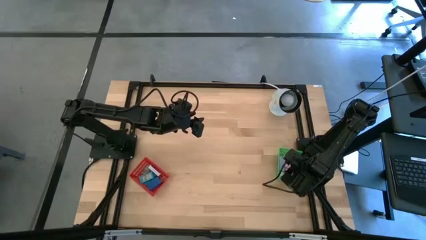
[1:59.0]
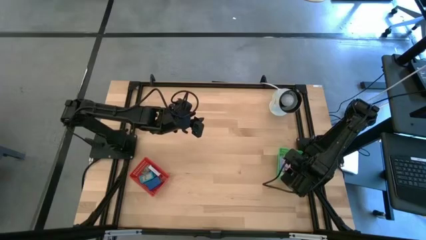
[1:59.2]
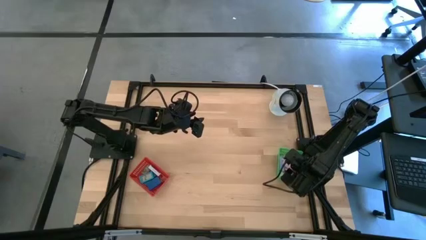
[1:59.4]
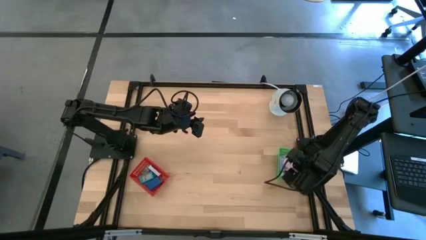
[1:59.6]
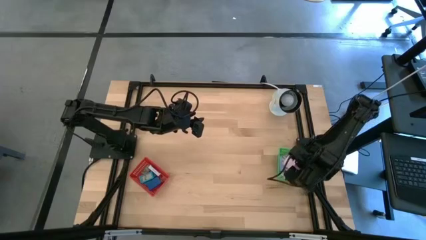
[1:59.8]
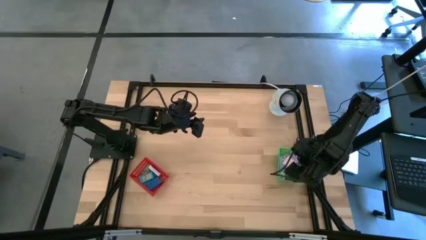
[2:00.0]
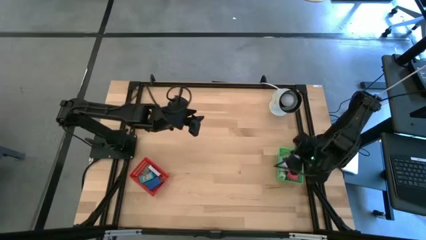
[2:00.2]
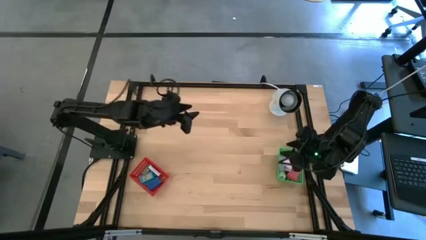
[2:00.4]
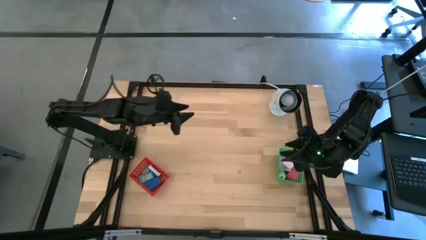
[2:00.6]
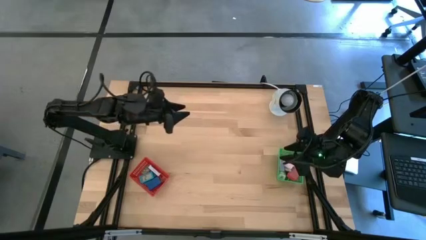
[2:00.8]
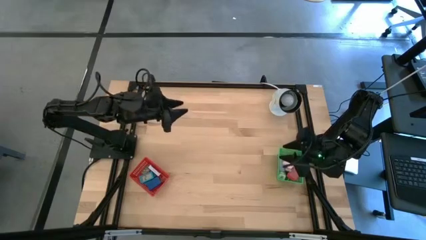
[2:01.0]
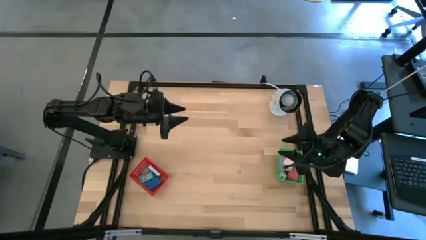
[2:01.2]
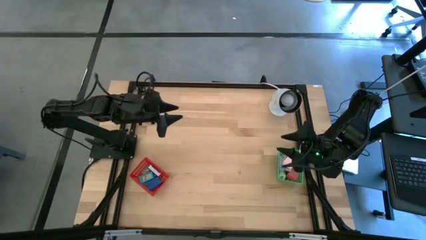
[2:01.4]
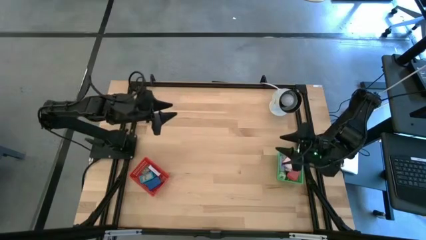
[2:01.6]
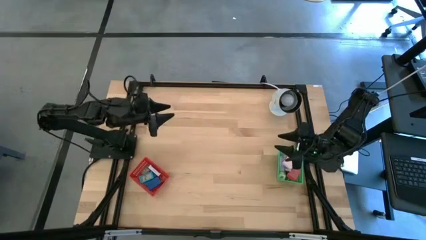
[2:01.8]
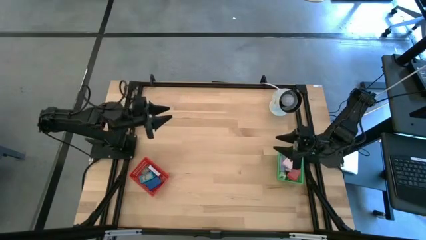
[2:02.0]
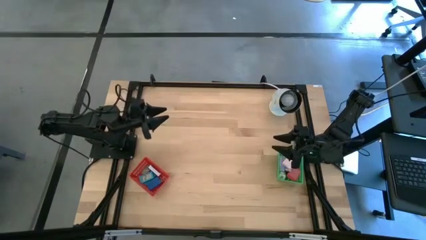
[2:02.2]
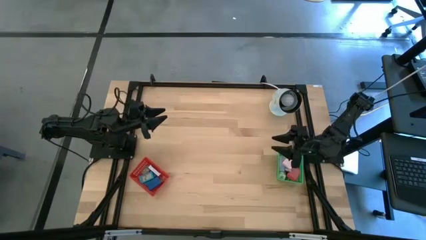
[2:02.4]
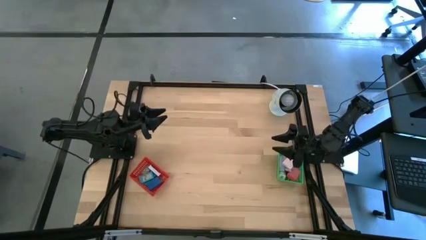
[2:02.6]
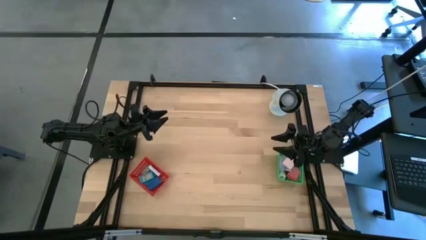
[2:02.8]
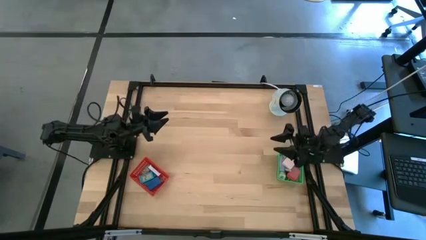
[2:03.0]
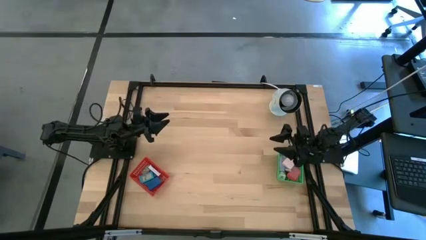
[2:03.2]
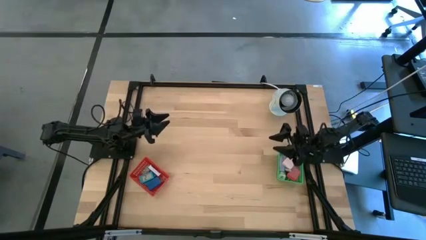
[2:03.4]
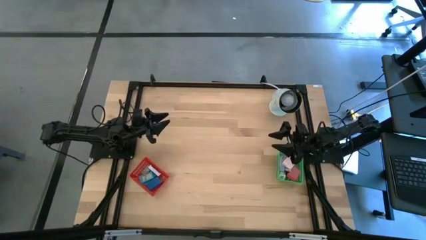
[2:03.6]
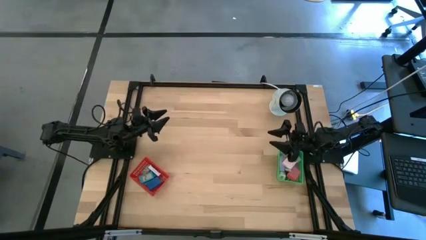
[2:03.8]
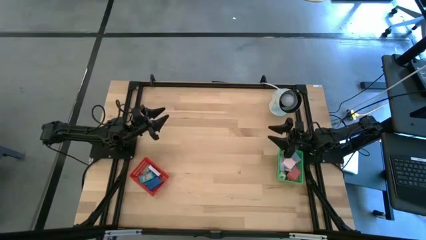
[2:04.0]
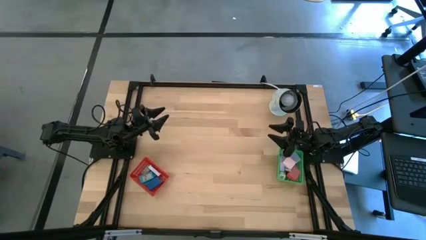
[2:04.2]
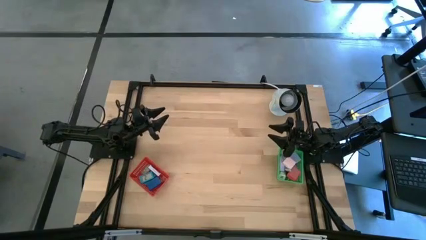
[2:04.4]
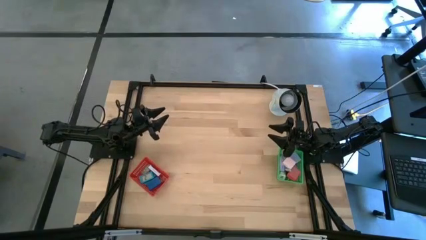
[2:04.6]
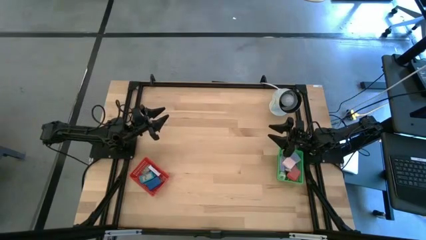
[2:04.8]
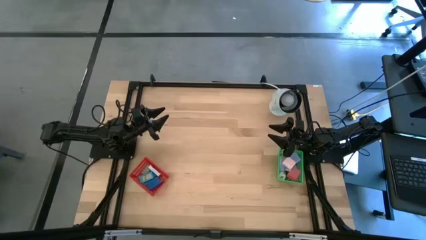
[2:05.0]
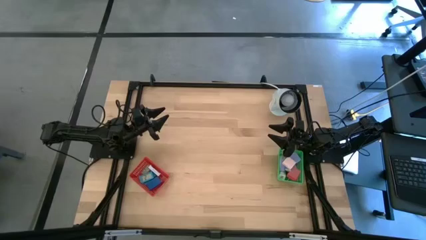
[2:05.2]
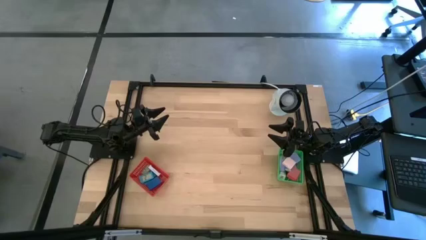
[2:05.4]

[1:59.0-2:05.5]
Task: Pick & Place Office items
Return to Home Position

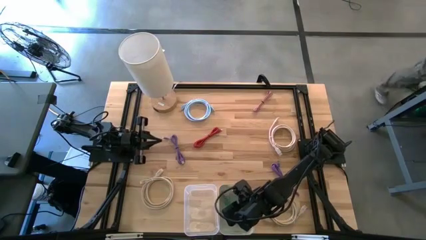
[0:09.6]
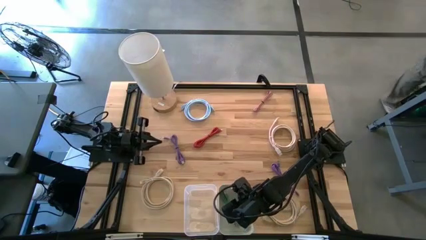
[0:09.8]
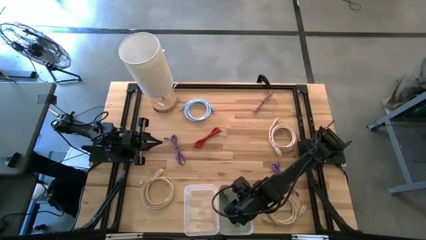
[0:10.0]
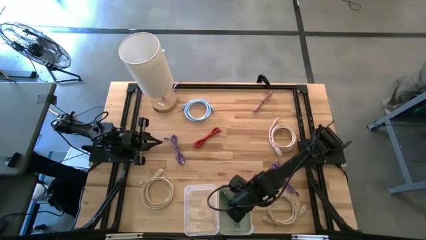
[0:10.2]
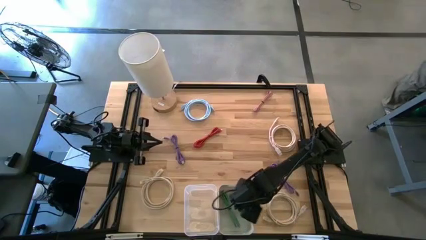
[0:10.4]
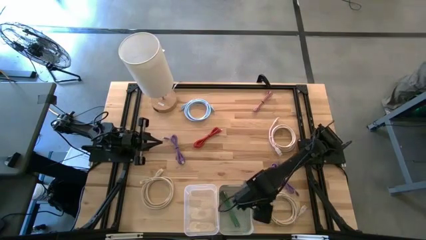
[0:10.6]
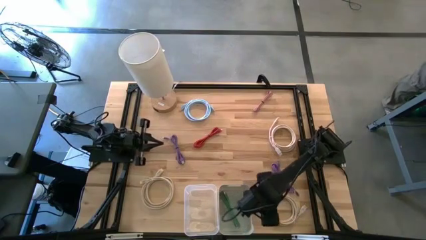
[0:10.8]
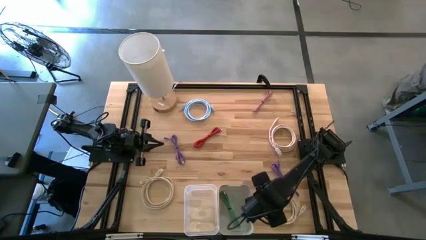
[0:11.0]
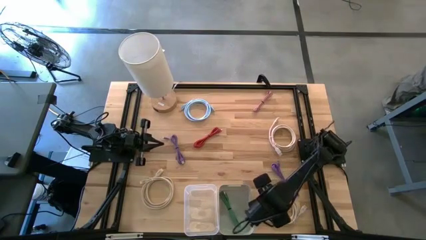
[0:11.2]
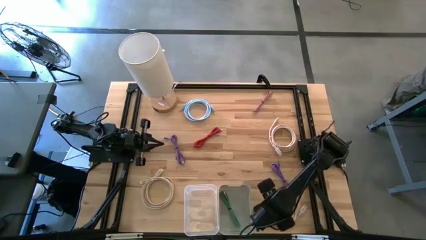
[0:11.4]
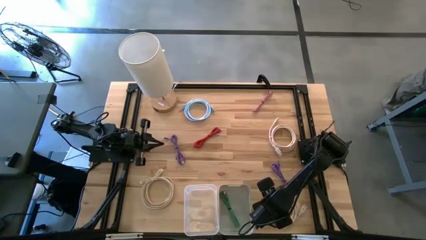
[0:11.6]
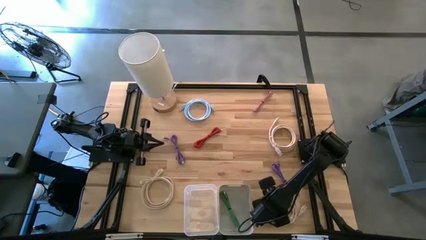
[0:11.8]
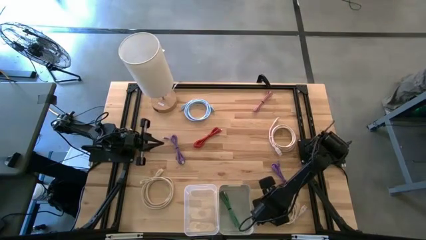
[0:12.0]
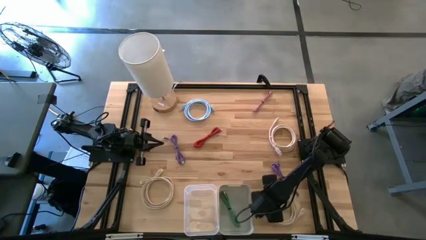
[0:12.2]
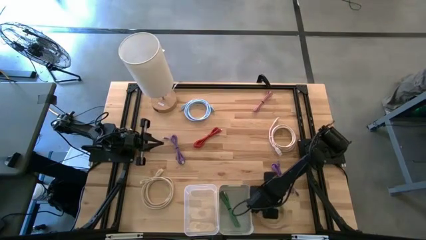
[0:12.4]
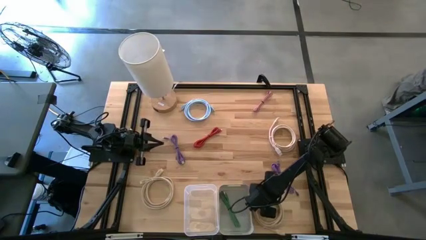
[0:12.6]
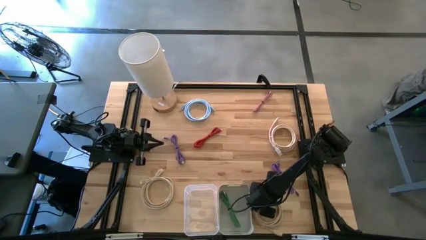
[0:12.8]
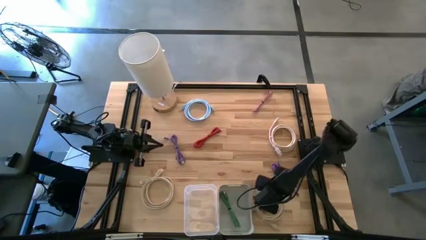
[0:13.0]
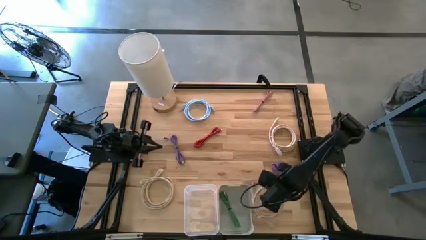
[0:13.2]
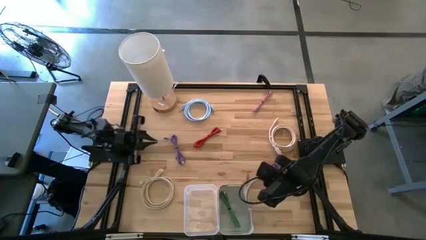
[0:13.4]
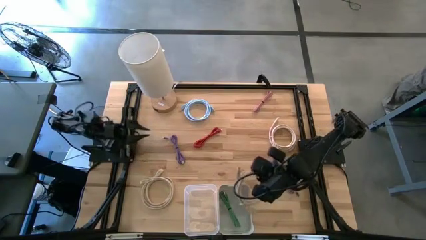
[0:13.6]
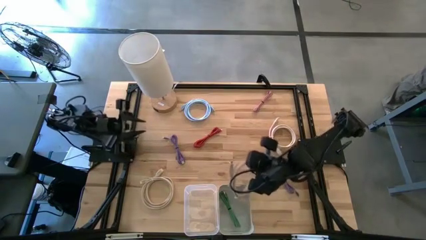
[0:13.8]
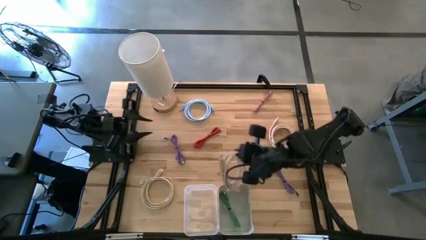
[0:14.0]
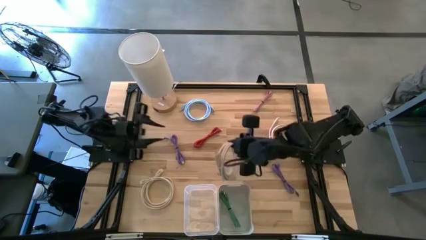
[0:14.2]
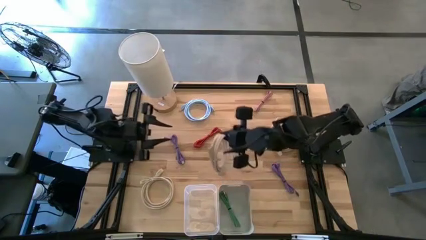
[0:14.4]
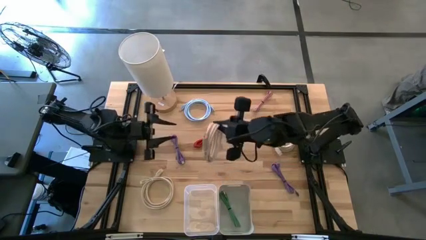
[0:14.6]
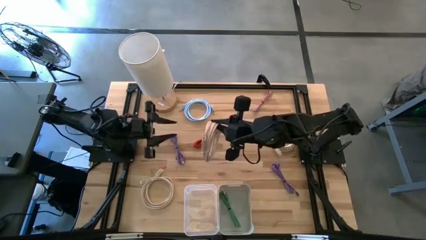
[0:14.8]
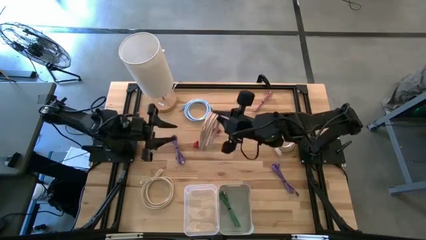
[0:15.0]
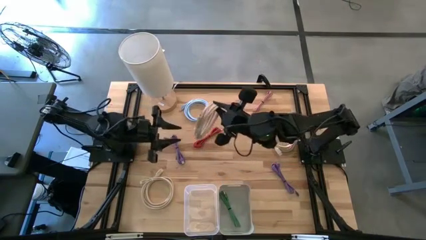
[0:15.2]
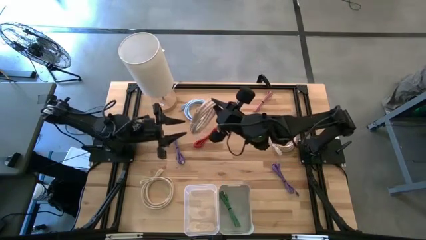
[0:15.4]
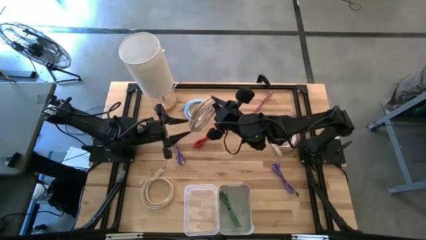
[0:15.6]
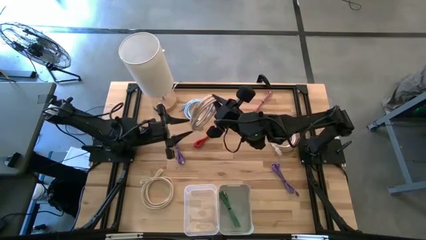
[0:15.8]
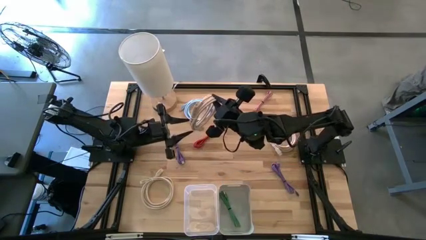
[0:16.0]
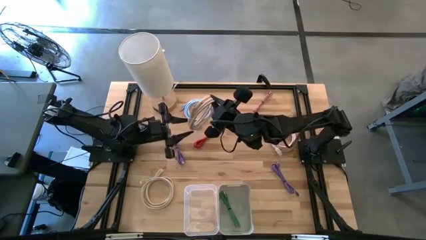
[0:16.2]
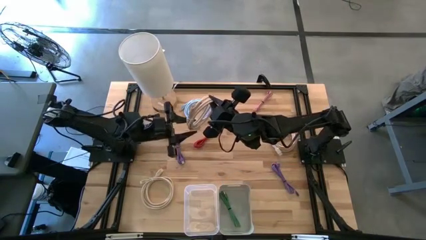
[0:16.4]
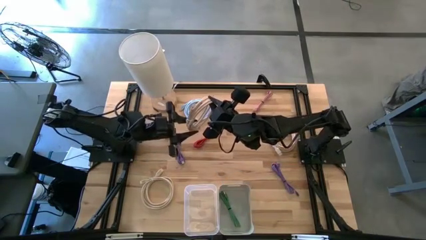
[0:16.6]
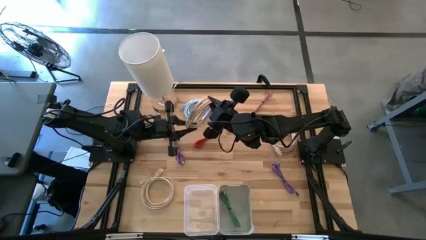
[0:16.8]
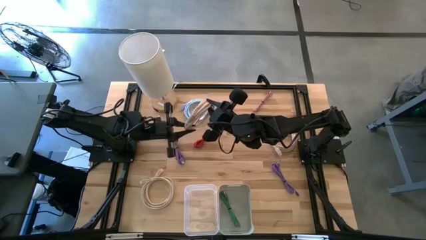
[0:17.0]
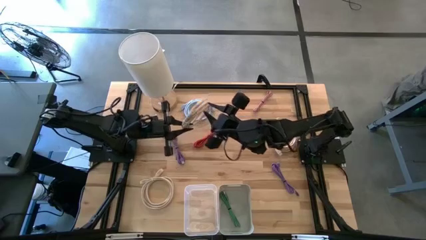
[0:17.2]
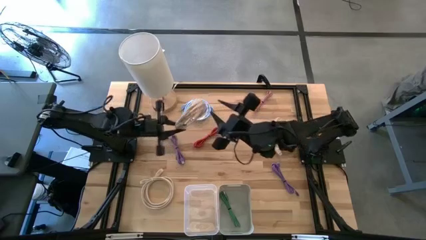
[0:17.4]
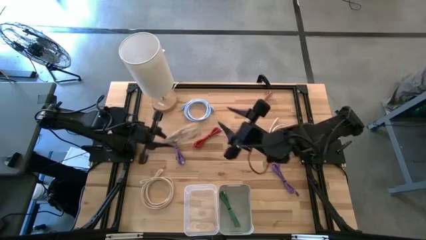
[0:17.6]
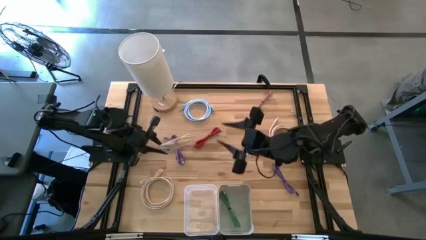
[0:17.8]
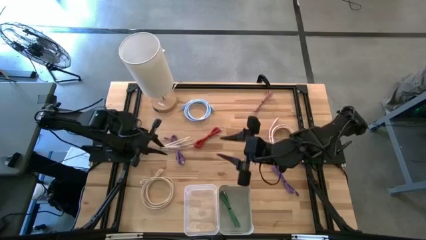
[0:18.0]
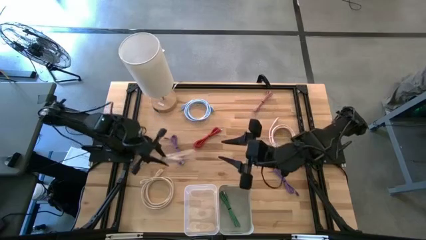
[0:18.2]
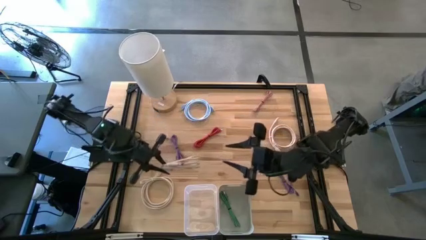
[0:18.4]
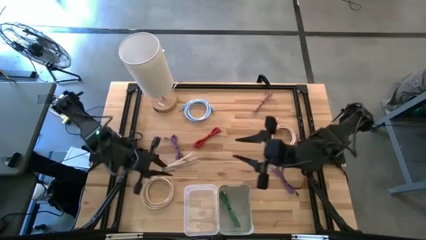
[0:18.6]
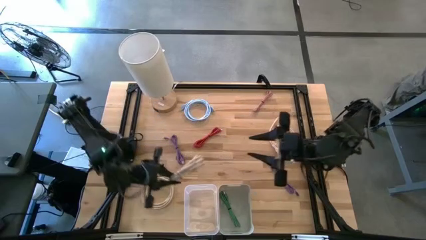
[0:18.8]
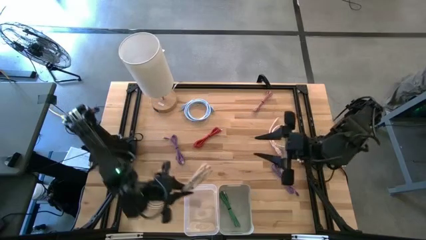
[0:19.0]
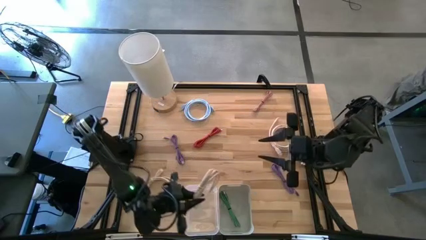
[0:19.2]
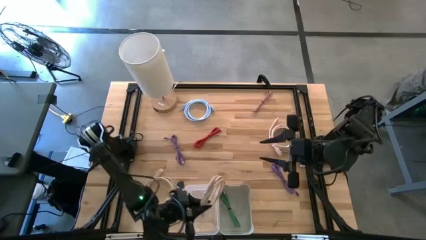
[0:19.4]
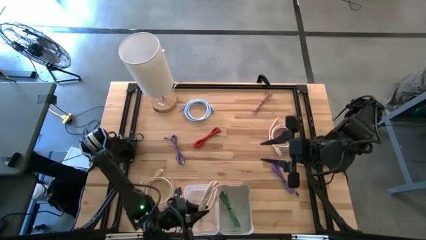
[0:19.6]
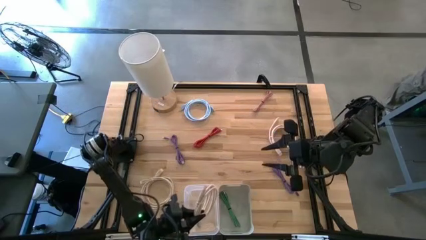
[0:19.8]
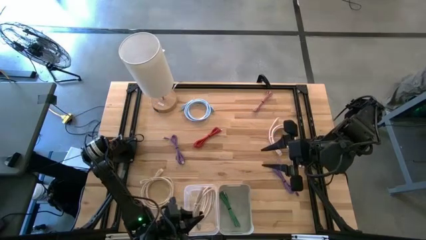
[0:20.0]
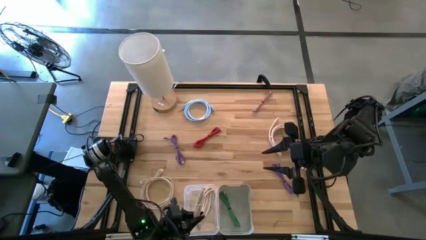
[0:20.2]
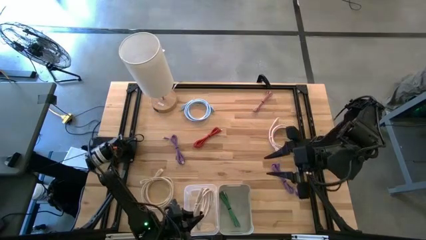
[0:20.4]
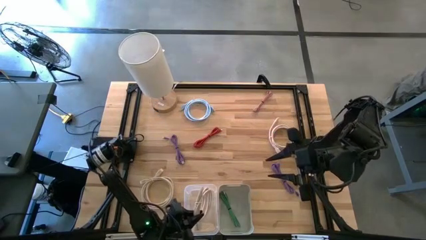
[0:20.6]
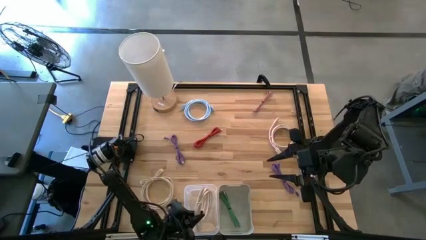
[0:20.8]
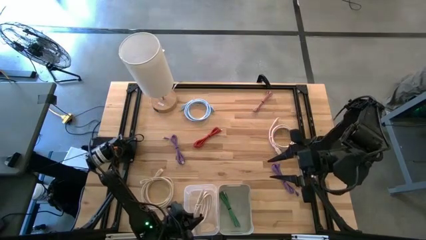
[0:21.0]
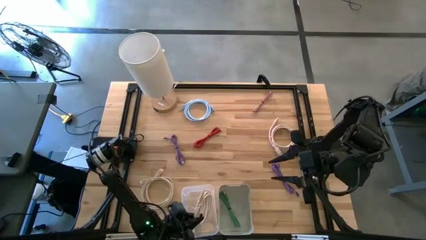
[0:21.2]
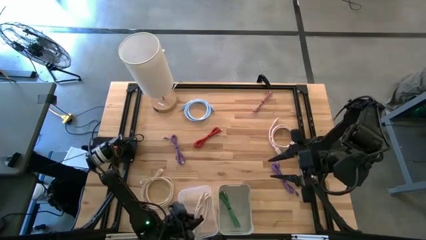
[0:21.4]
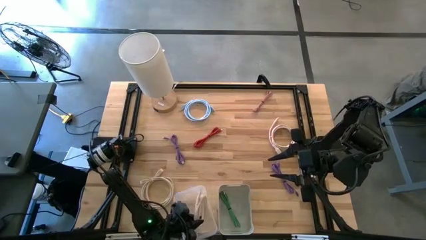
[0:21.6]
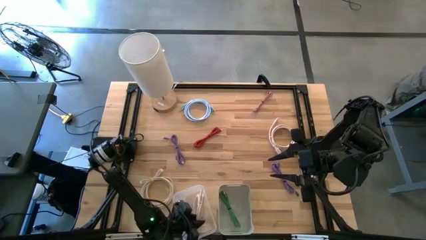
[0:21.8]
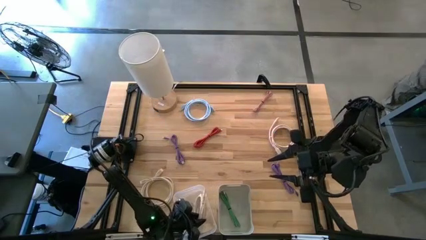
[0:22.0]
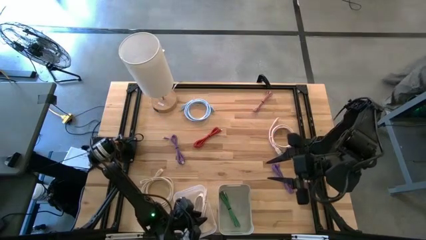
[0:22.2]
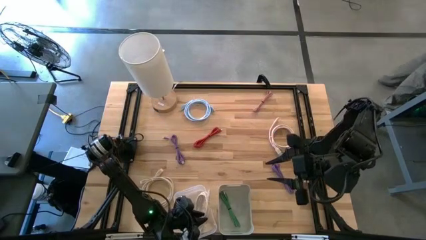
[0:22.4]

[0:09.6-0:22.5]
Task: Pick & Place USB Port
Put the bottom right brown HDMI cable into the transparent bin
